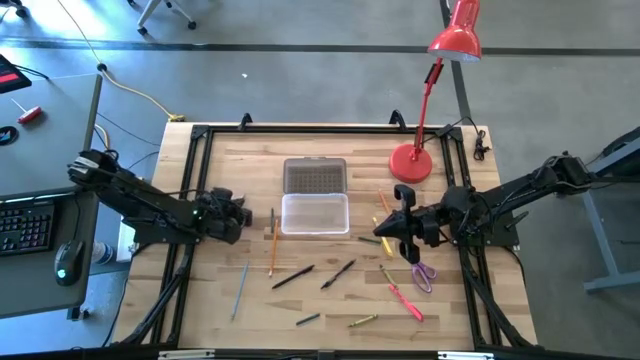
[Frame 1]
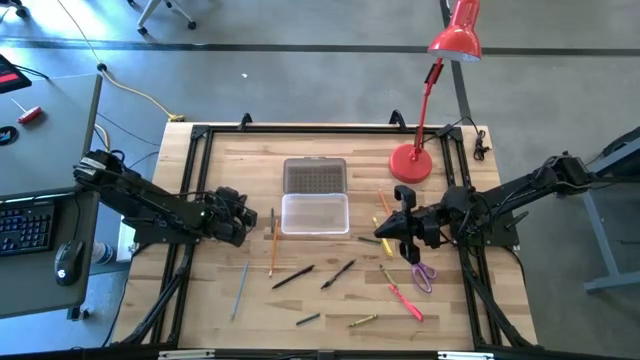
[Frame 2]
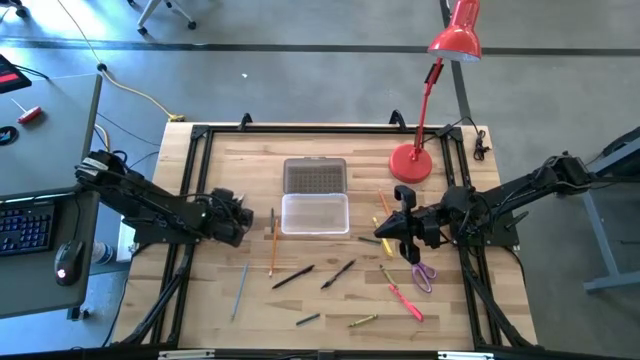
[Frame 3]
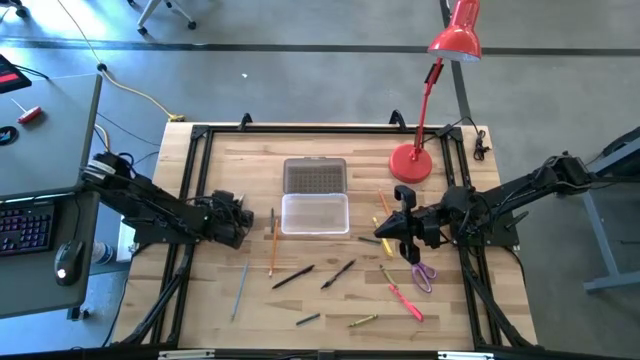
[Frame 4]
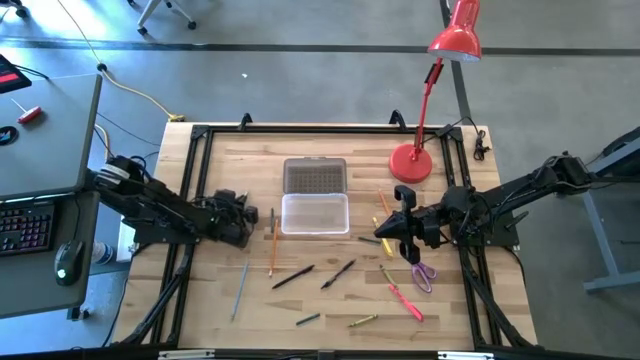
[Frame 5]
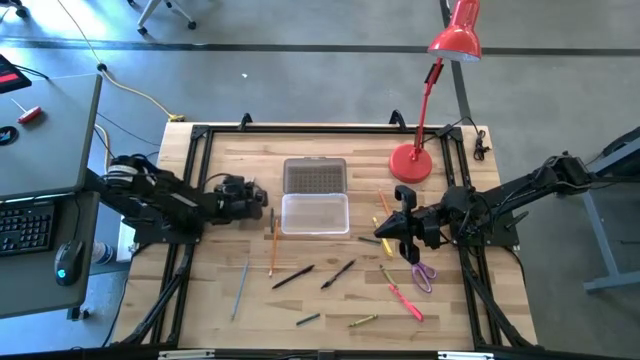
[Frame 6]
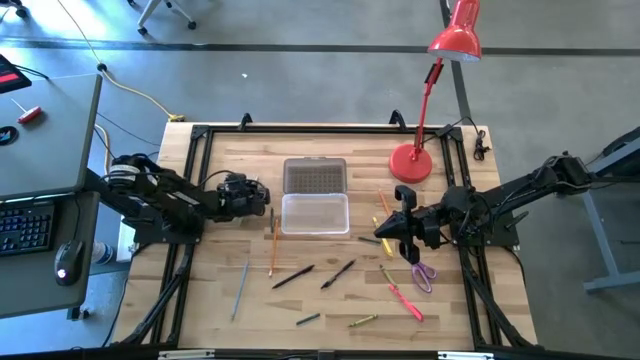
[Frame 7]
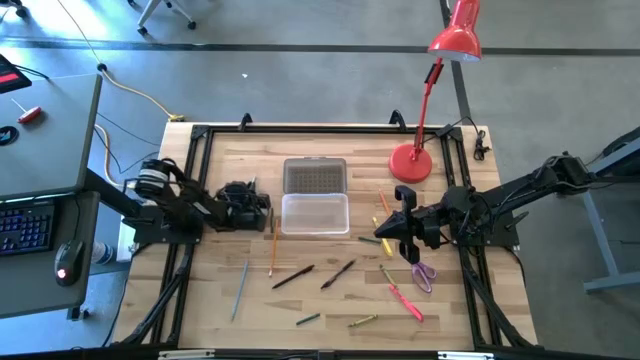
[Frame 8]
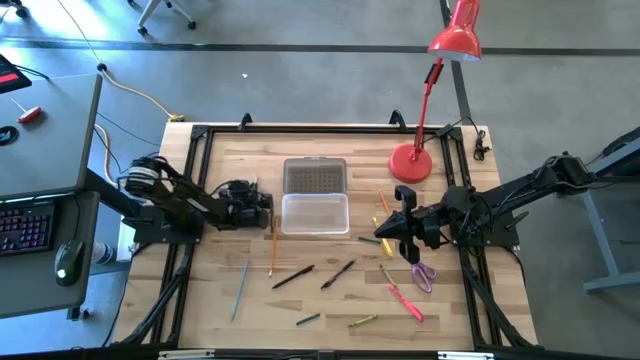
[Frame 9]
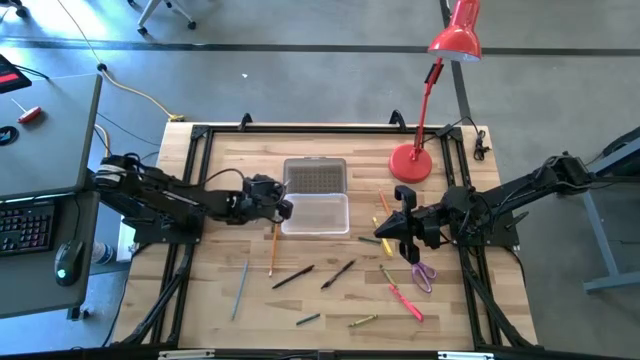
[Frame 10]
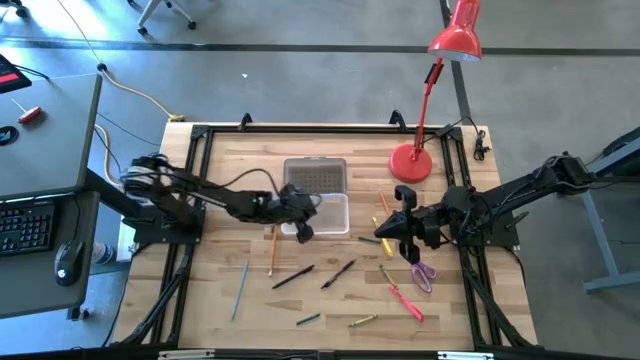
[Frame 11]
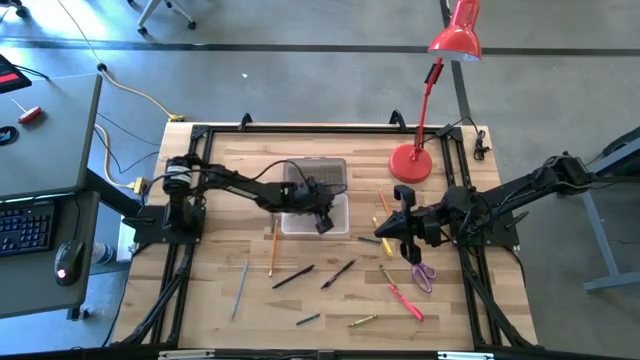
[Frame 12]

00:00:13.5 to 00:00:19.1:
Task: Pick & place school supplies into a supply box
Put the top light blue pencil into the supply box

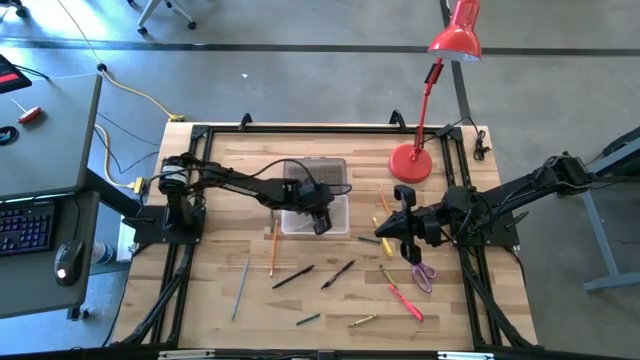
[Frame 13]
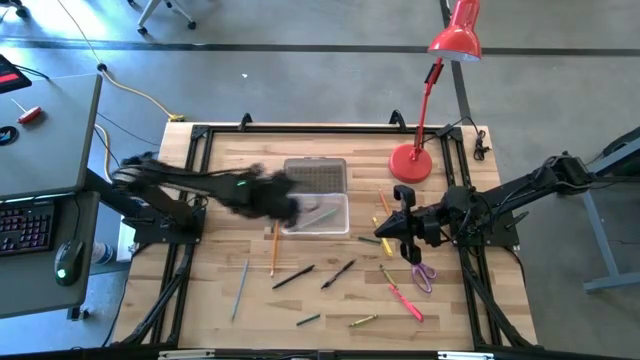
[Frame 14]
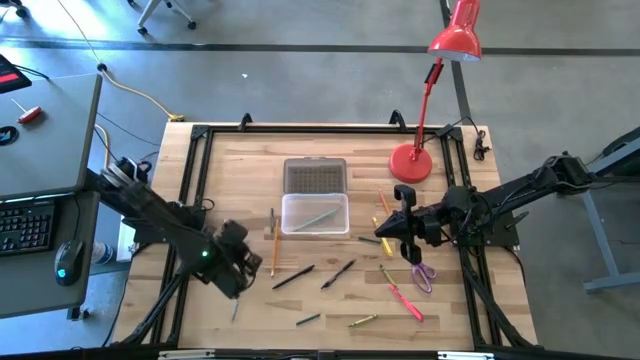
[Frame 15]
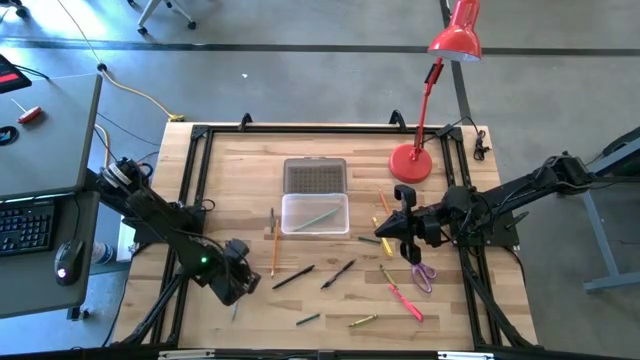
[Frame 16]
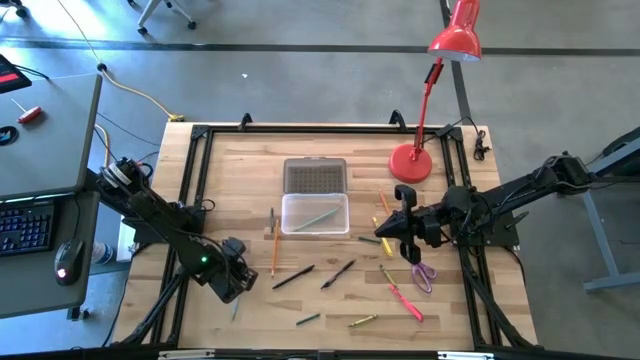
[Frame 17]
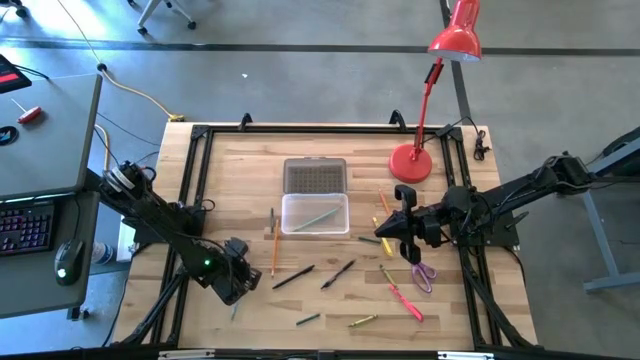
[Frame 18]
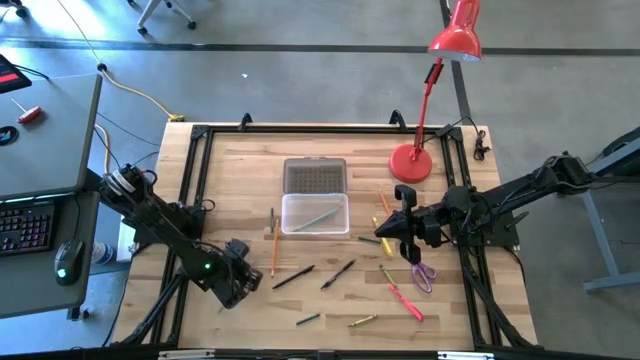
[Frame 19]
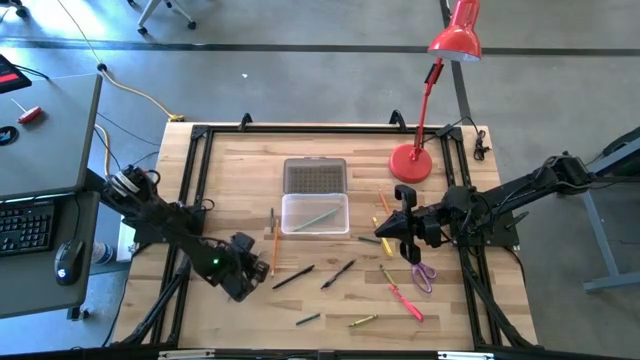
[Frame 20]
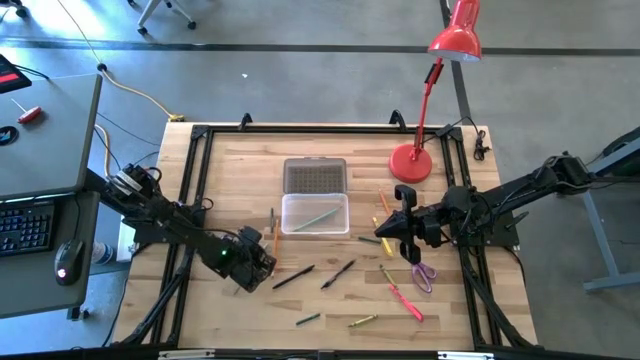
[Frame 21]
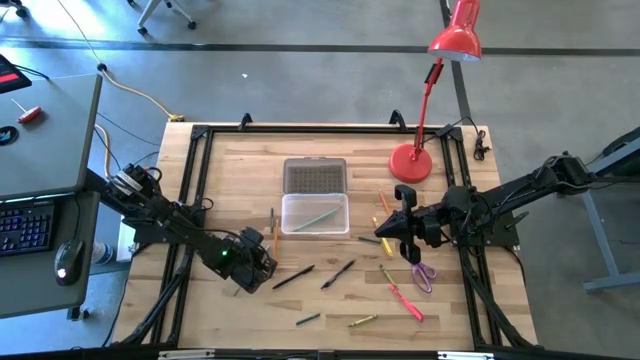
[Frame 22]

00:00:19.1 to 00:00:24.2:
Put the light blue pencil into the supply box

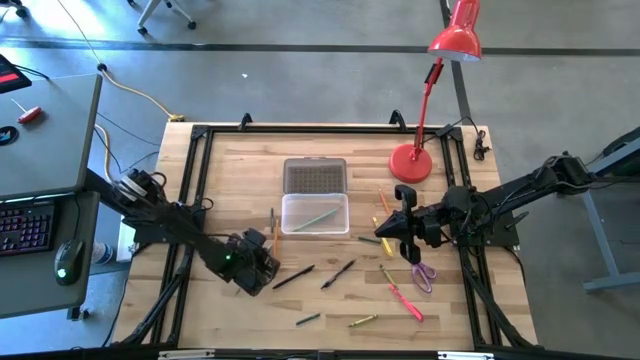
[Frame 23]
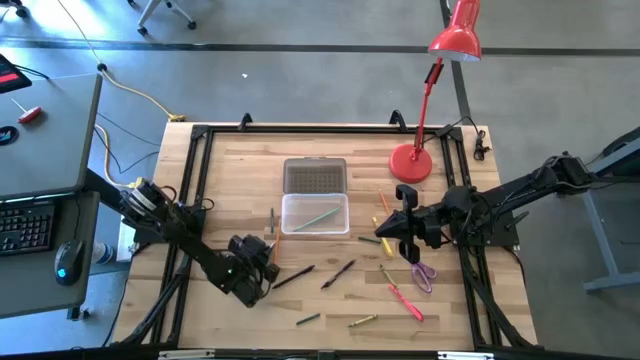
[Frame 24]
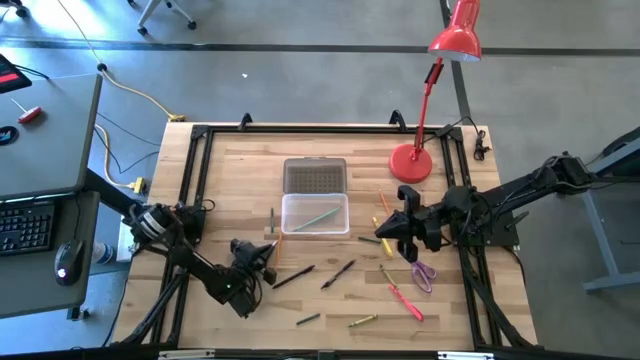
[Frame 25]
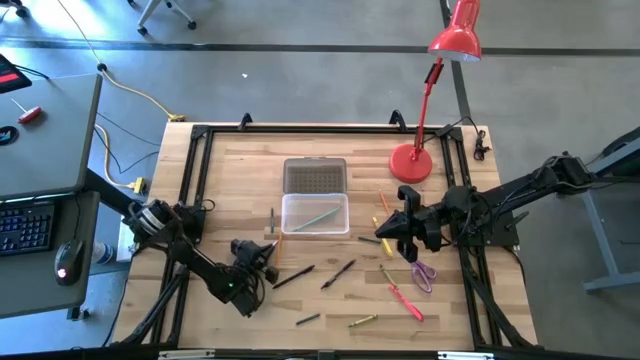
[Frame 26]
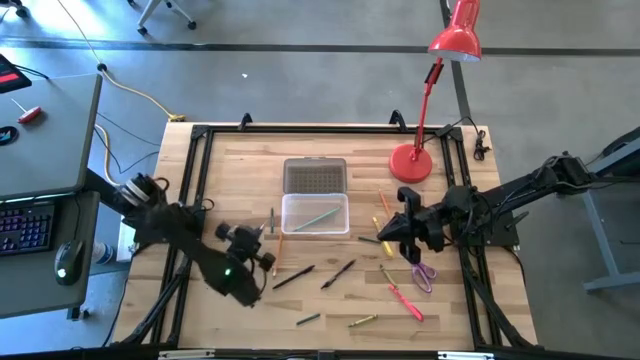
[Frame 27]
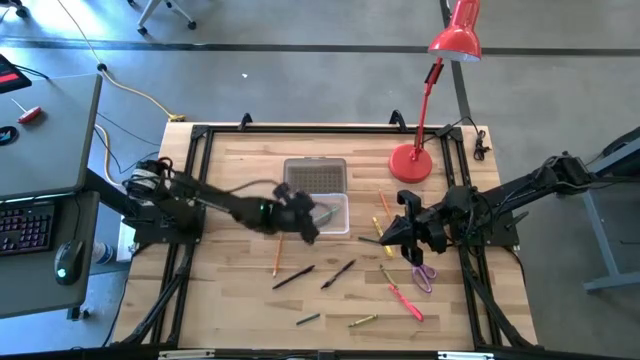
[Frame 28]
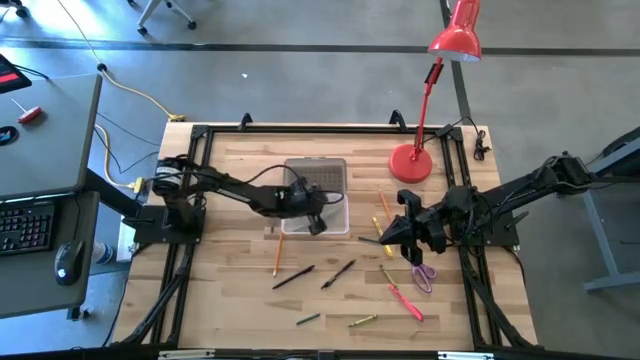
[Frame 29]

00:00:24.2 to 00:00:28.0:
Put the light blue pencil into the supply box

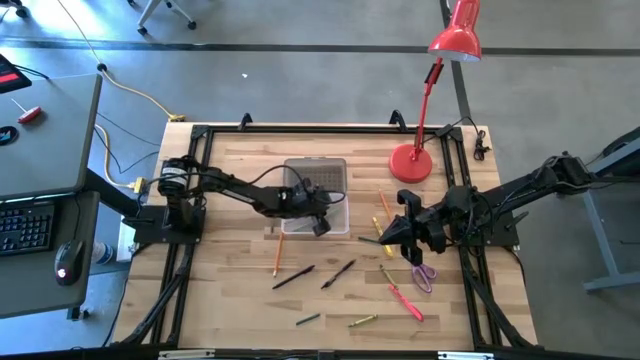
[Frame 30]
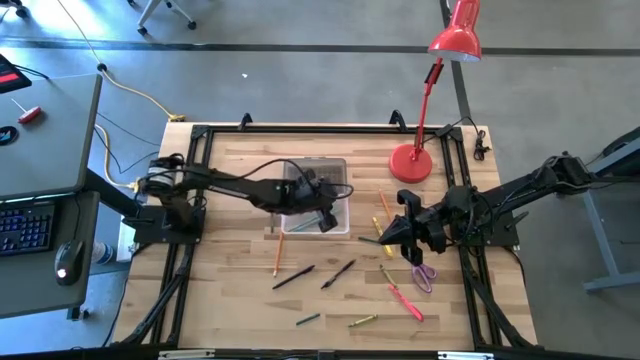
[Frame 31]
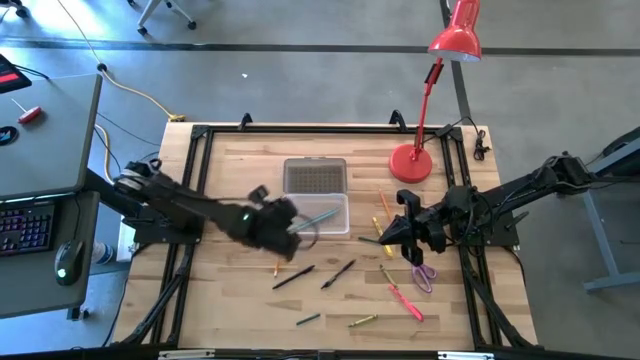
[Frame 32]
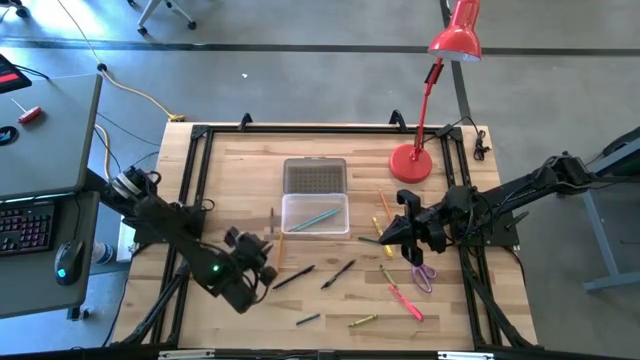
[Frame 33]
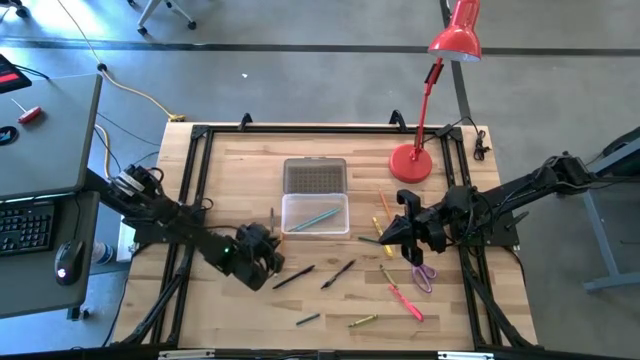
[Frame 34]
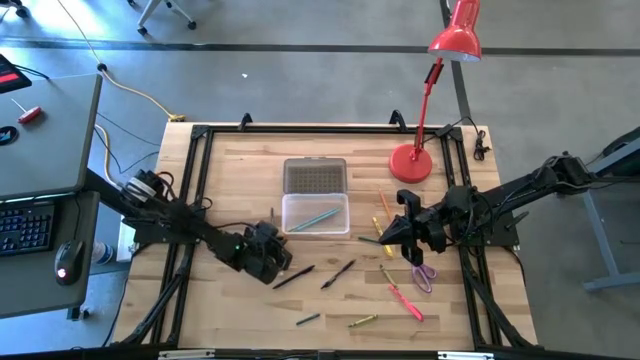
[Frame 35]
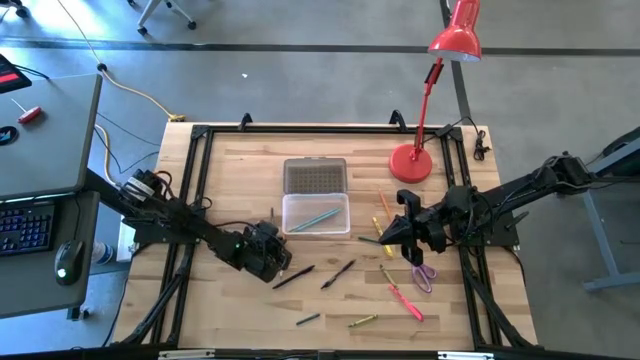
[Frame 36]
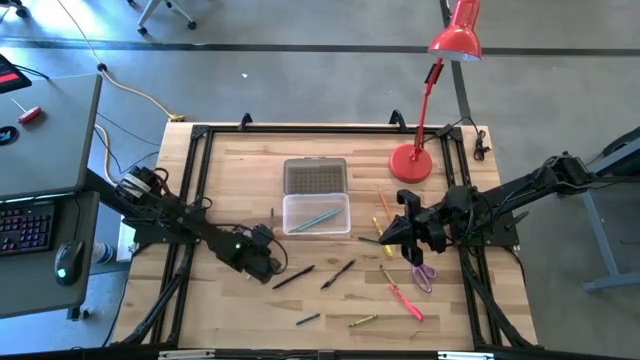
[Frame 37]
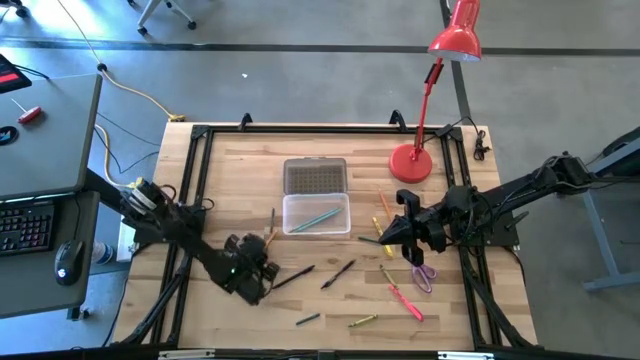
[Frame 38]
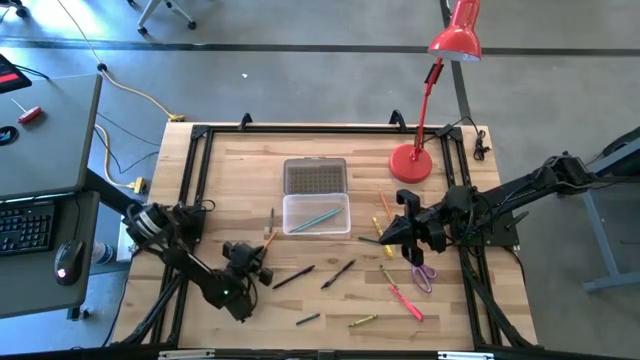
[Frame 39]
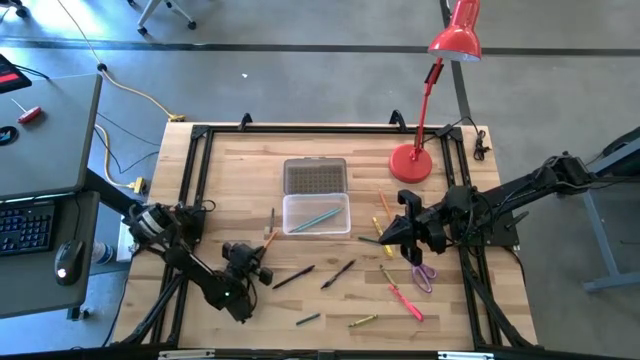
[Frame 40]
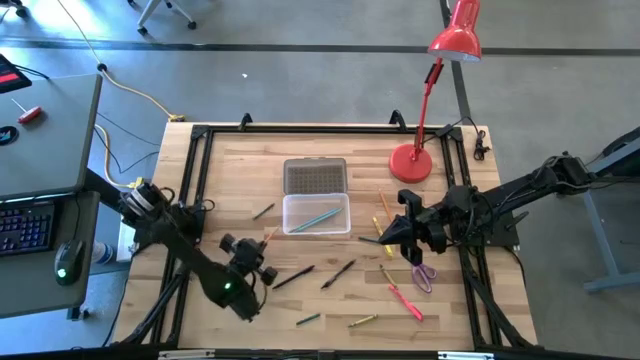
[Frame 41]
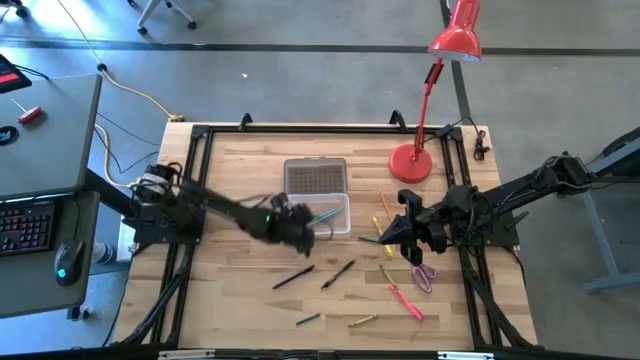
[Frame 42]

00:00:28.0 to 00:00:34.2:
Put the bottom orange pencil into the supply box
